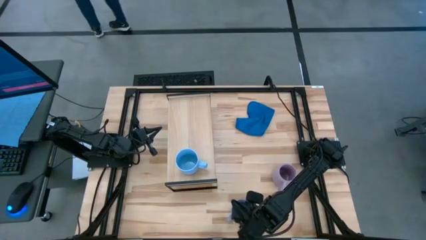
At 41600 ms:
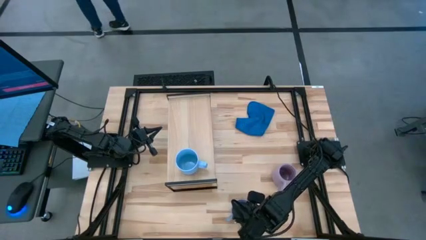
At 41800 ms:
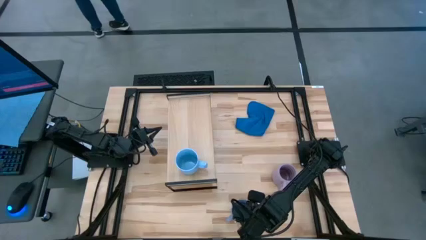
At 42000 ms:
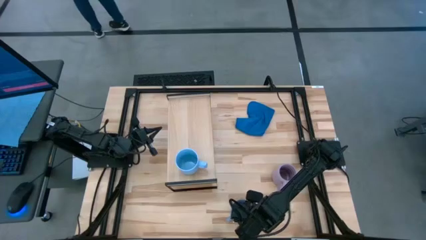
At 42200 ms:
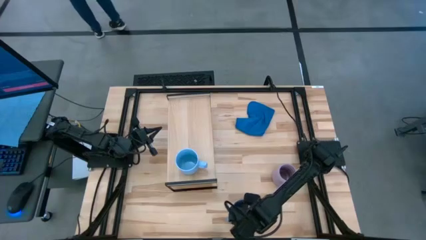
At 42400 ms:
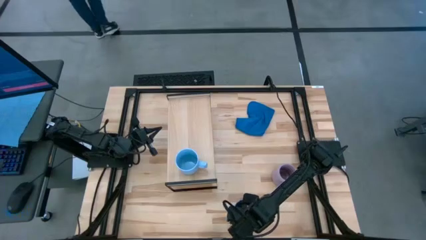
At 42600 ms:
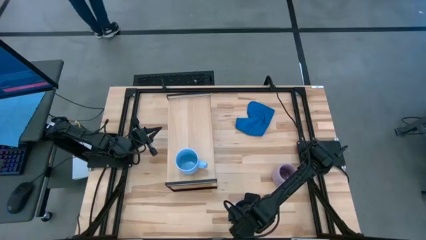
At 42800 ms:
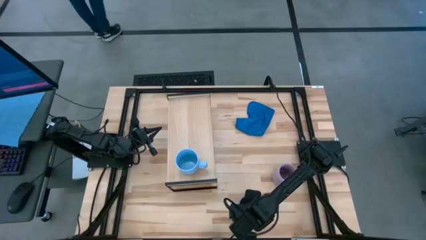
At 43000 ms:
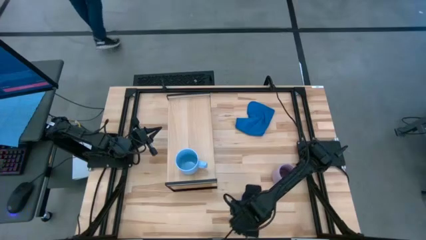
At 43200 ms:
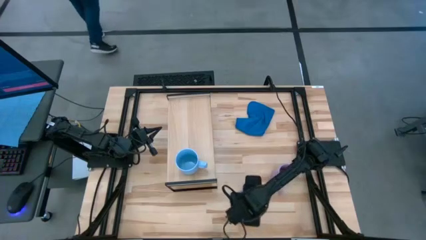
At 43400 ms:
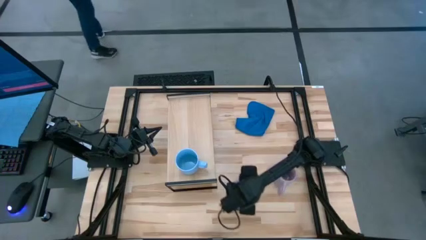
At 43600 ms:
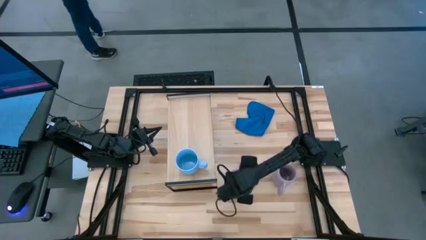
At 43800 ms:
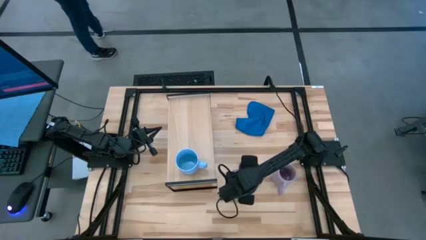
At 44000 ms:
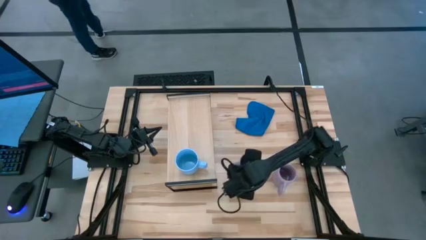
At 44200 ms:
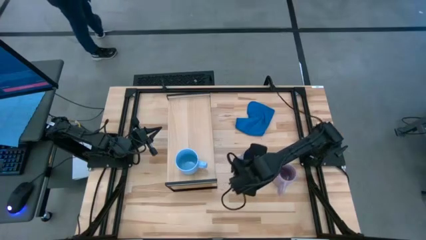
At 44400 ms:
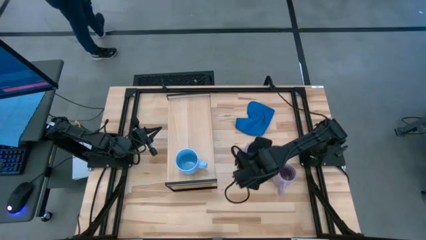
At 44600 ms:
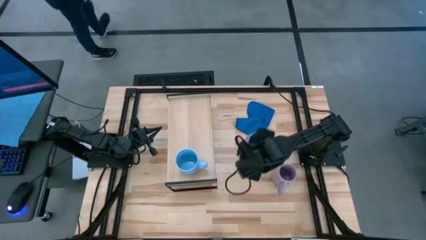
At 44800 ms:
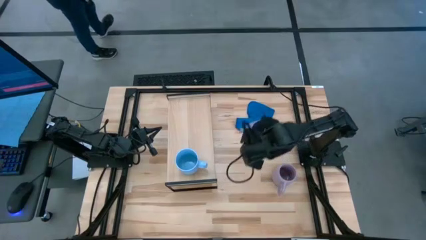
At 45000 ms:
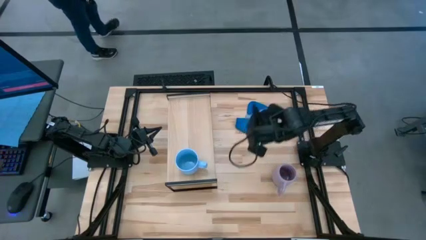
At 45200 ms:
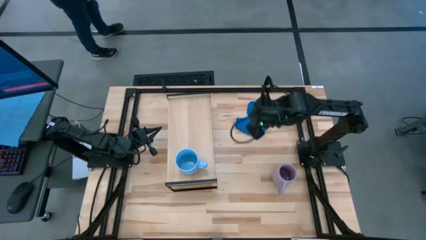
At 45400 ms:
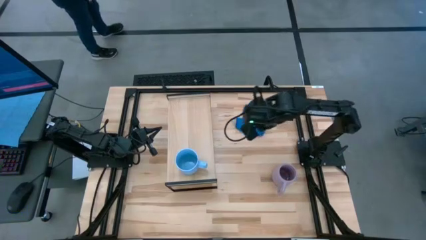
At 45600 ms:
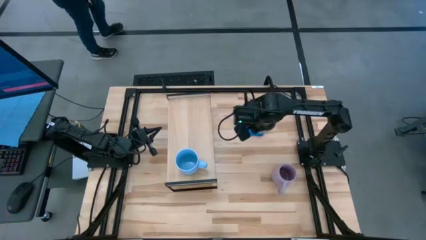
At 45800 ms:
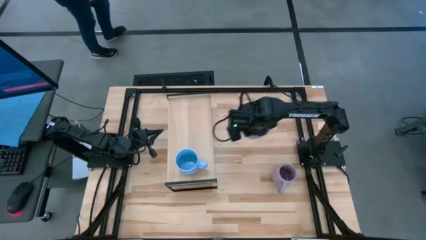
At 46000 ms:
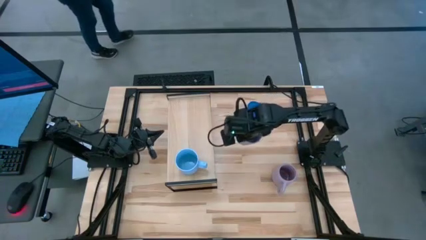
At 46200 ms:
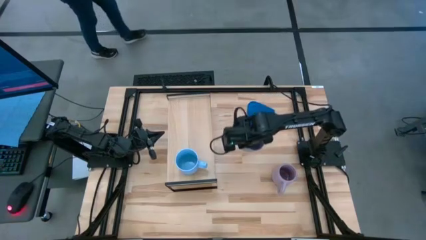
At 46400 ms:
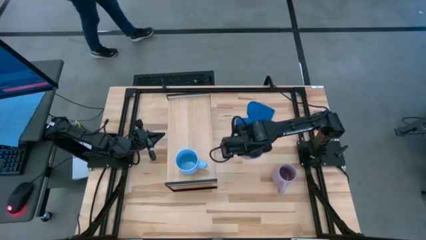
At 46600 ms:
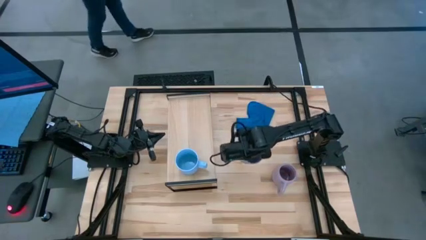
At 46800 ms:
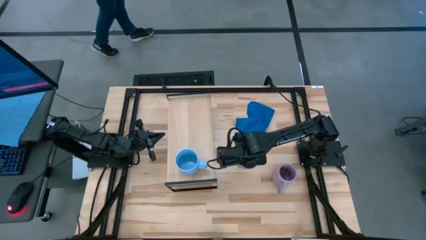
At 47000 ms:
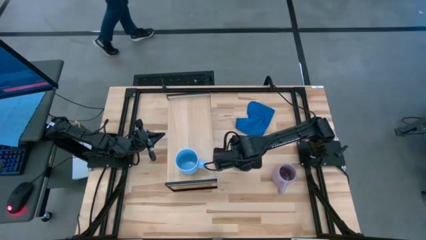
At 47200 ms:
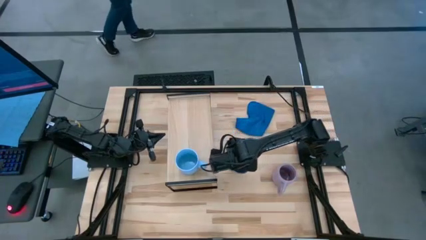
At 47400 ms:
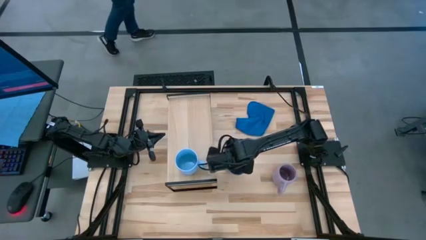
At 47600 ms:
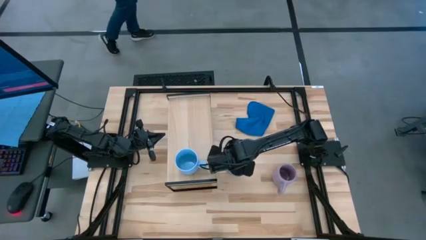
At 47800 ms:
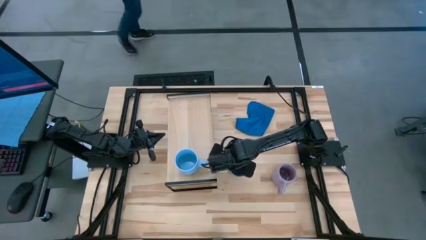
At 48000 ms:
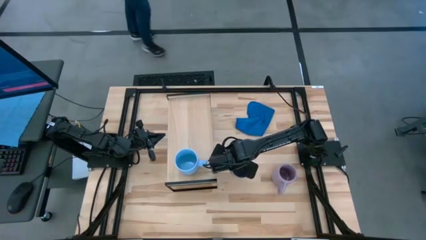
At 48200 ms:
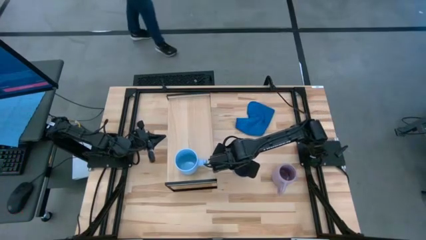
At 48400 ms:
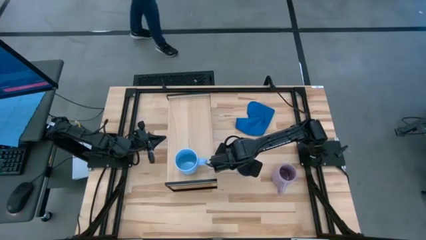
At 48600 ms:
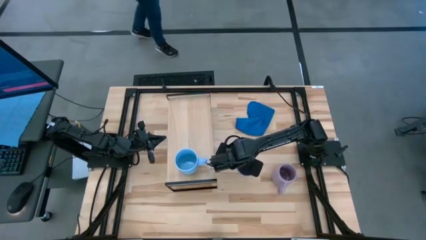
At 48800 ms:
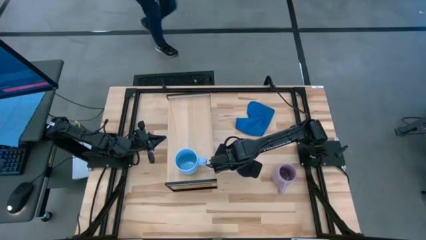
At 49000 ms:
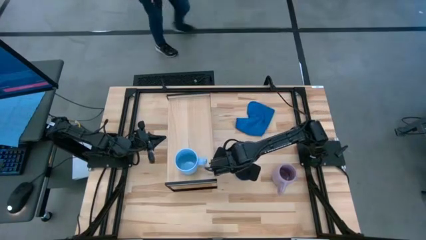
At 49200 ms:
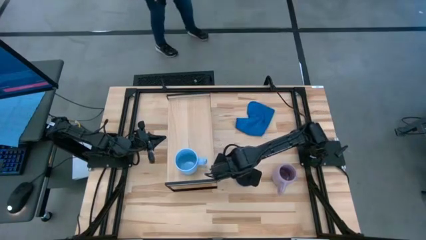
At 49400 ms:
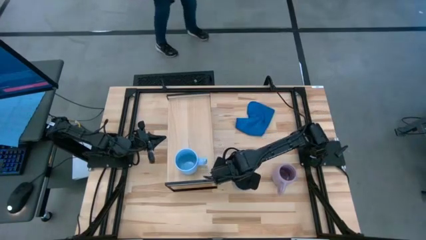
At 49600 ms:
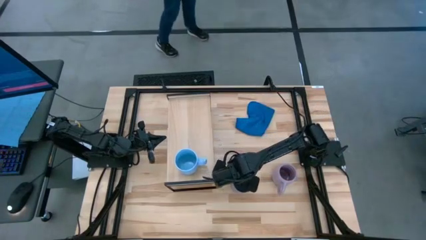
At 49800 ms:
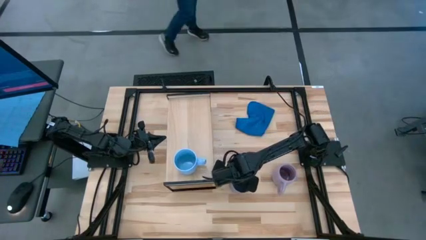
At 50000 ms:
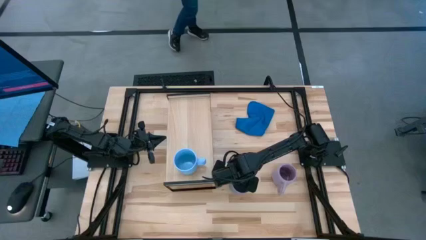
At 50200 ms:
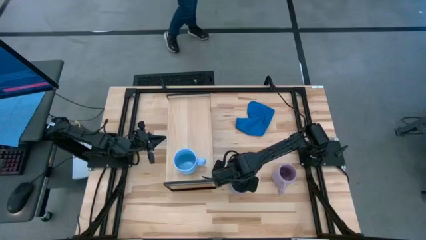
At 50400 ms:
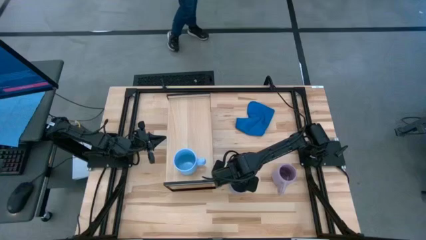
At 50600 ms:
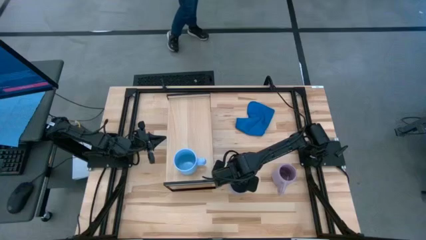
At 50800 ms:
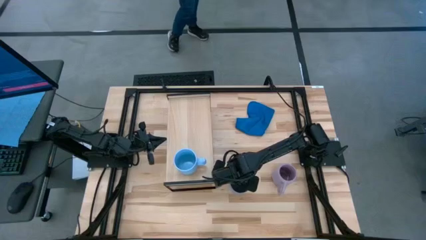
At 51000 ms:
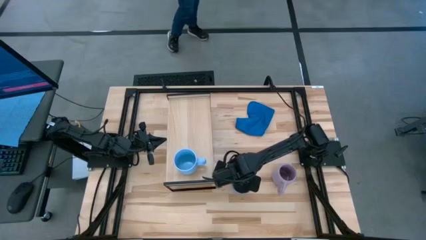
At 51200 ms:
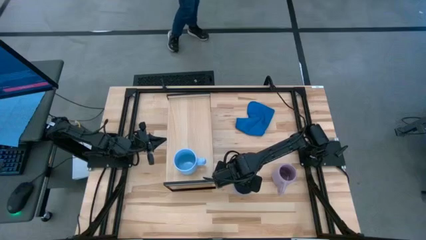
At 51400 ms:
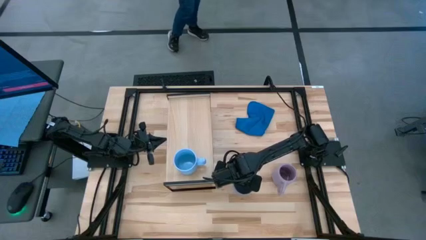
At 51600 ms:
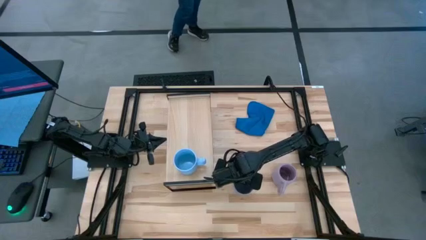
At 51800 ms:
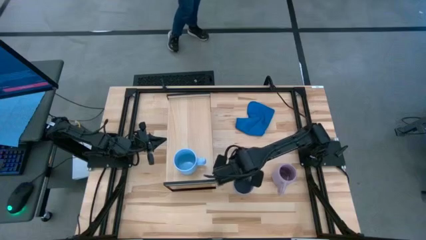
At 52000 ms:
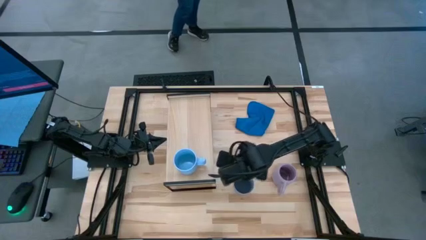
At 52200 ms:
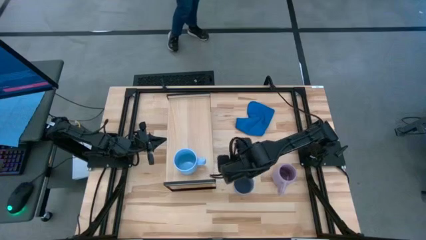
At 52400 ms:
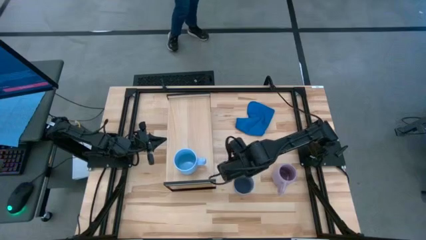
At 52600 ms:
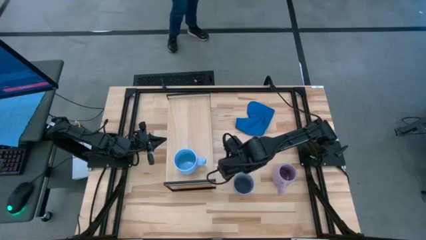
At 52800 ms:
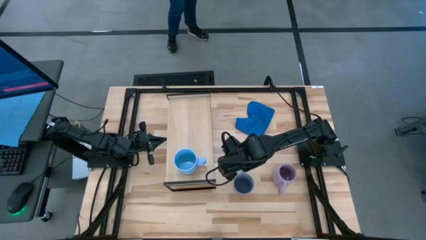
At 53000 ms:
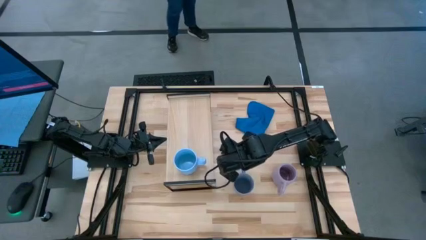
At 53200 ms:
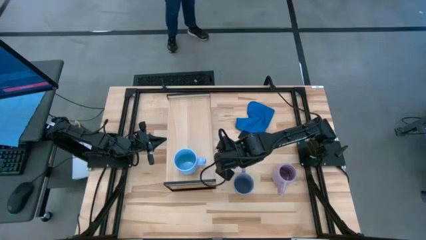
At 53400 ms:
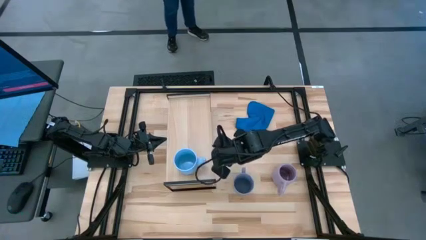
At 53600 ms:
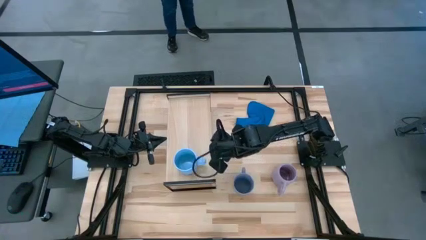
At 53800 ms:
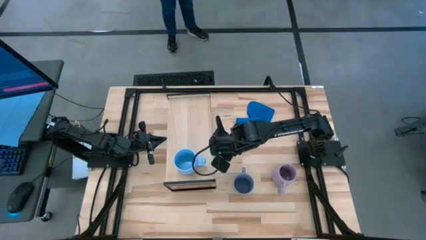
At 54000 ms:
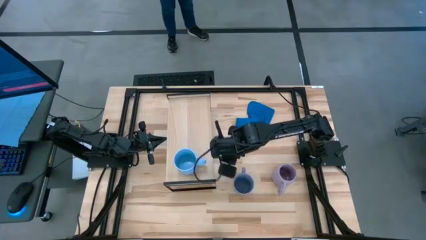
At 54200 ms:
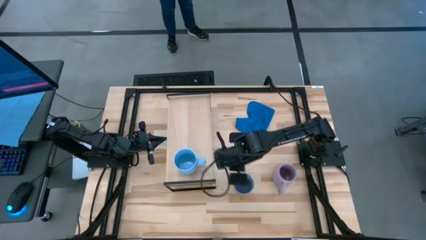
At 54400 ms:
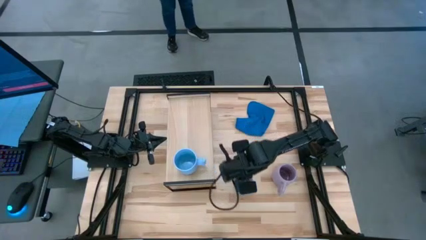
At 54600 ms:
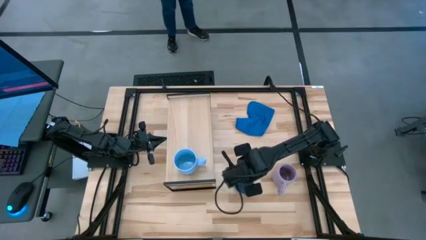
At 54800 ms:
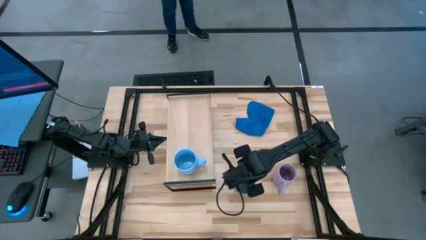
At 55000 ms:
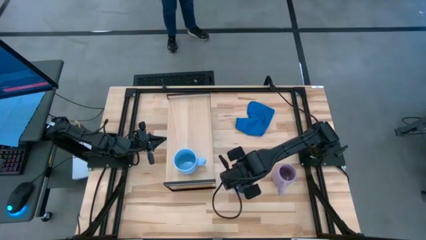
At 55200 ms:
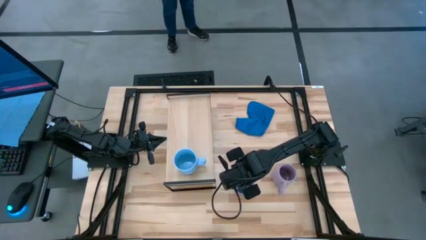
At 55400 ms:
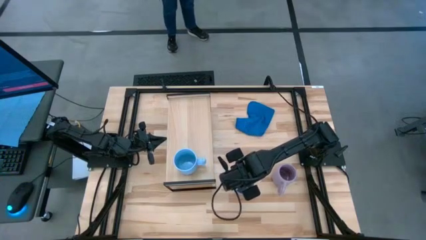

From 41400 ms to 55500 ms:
Task: Stack small to large cups/mugs on shelf
Put the blue mug on the shelf
